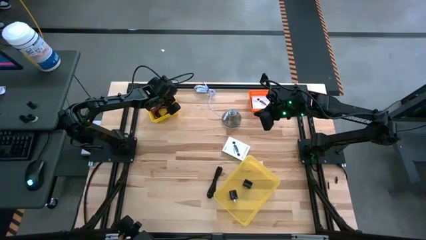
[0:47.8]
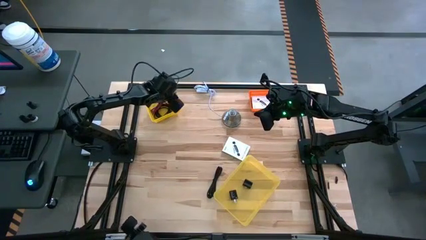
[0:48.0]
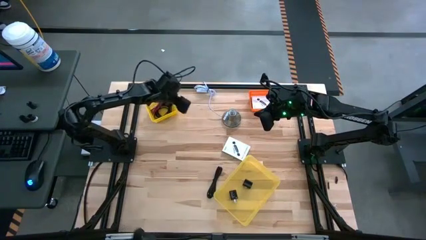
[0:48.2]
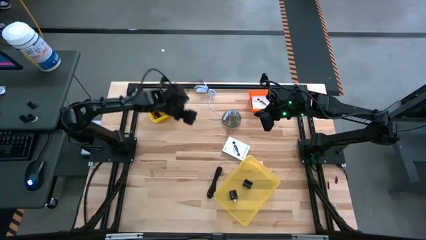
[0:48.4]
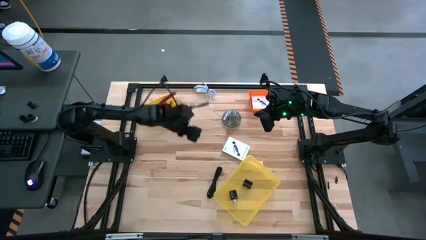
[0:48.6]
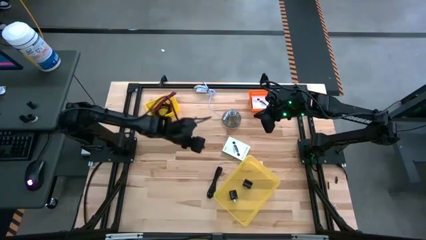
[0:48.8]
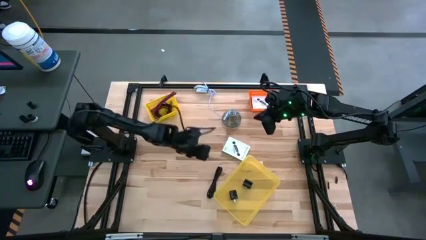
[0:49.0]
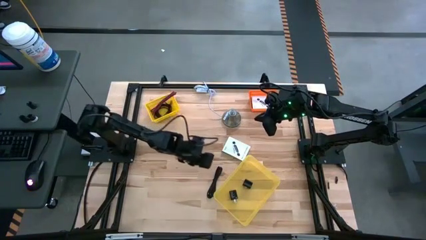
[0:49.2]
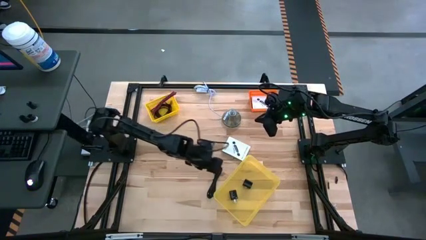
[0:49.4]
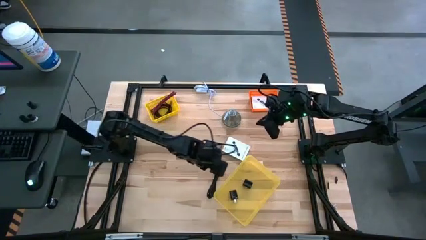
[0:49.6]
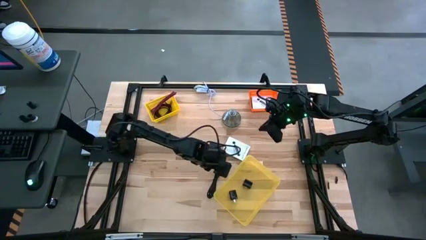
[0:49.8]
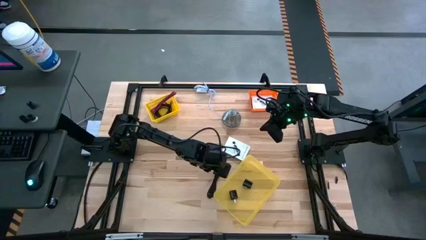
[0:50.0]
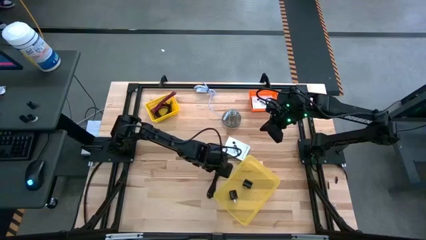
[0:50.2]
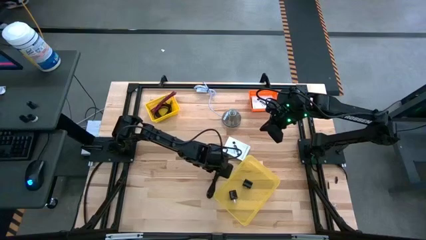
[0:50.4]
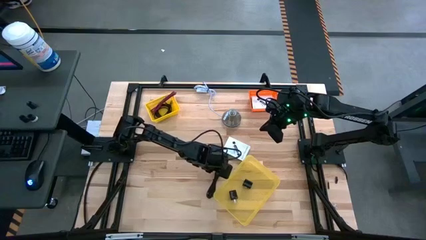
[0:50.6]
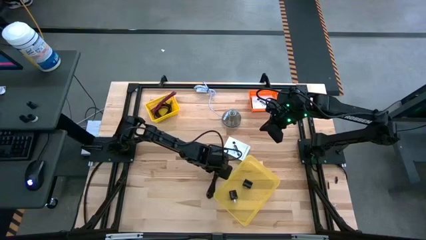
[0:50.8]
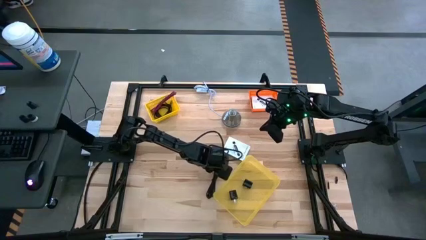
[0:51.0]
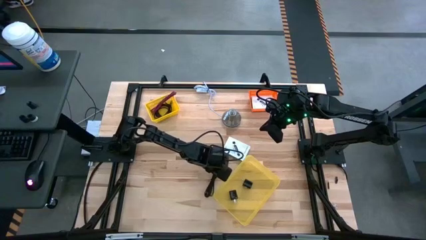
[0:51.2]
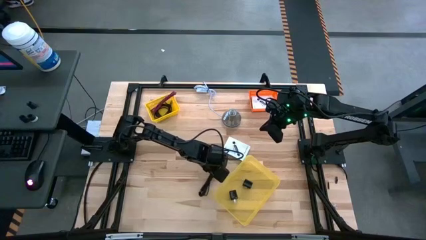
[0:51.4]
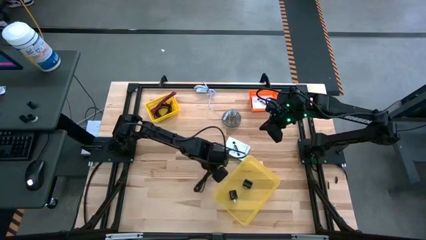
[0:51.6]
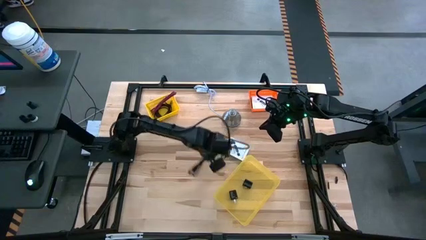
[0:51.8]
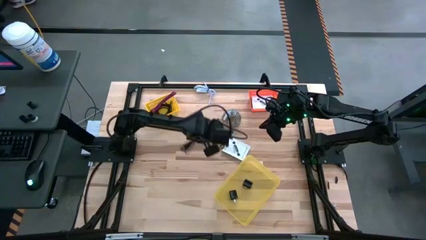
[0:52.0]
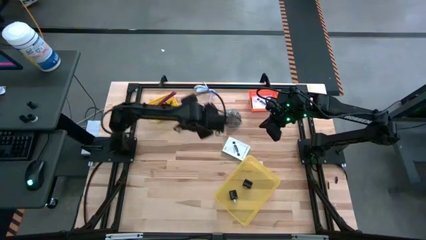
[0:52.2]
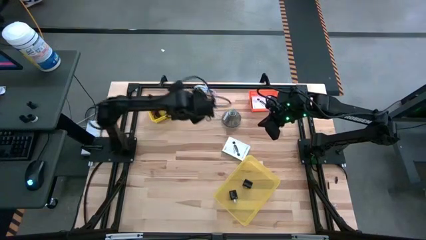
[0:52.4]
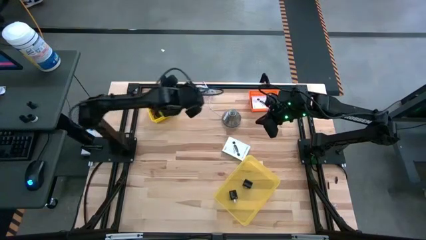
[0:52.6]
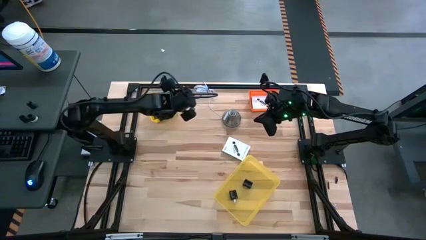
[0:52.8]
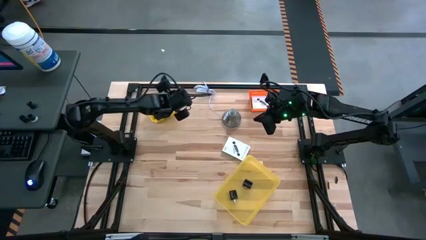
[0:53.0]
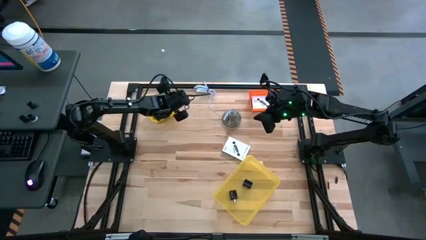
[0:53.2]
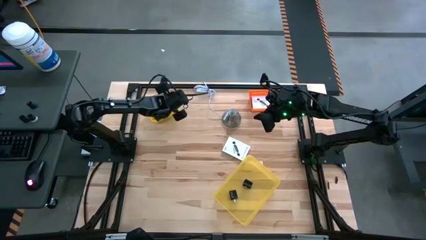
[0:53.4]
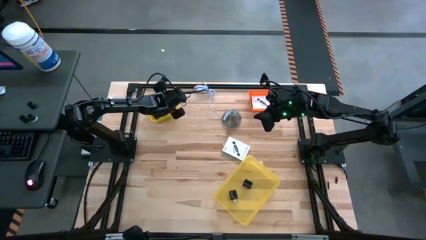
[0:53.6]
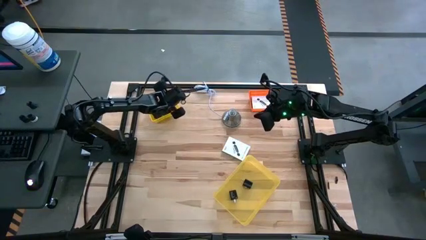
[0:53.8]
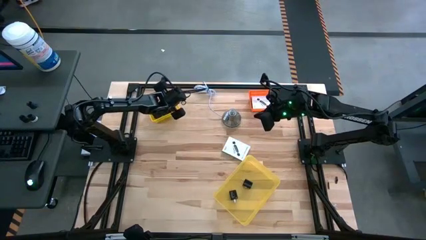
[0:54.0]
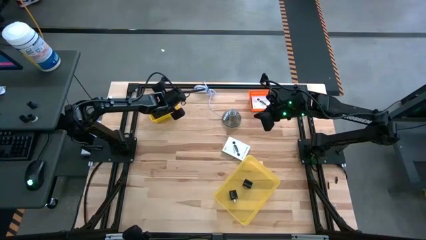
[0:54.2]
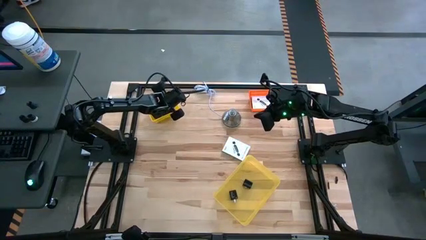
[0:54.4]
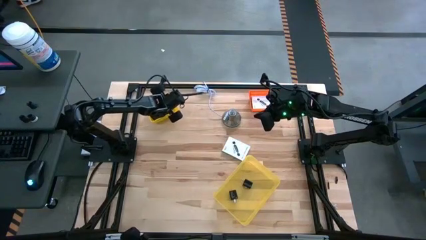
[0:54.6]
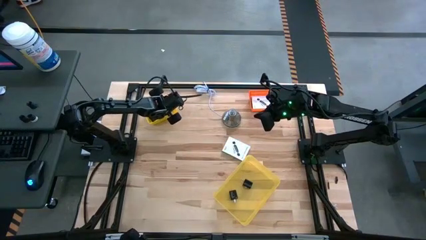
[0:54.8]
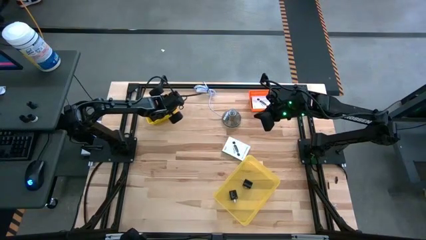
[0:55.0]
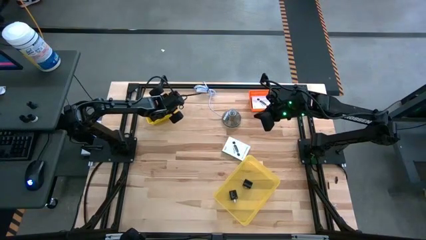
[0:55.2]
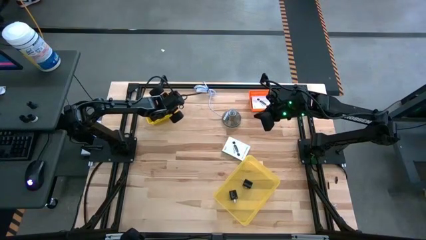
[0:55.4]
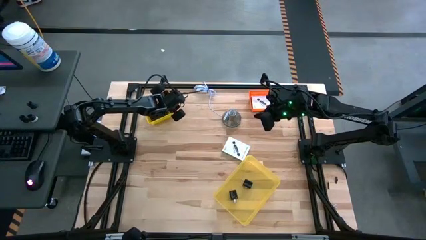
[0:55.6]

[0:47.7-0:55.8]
Task: Pick and place items into bin
Put the black USB cable into the yellow bin

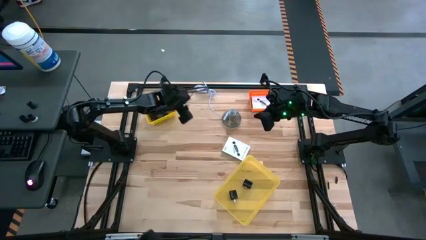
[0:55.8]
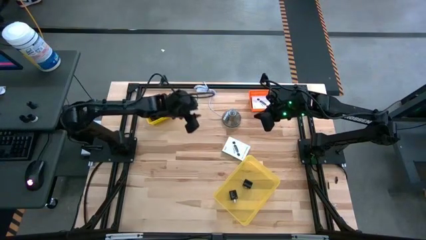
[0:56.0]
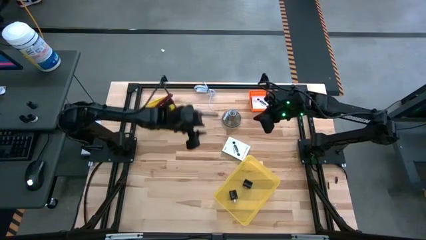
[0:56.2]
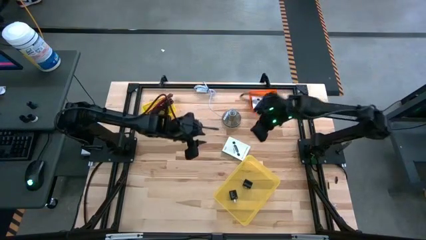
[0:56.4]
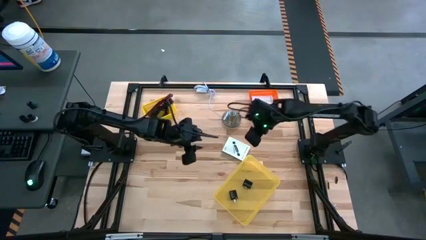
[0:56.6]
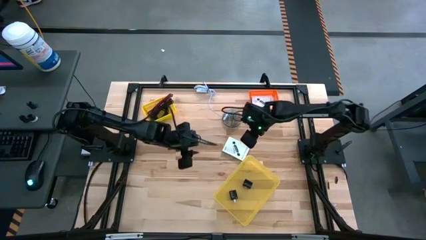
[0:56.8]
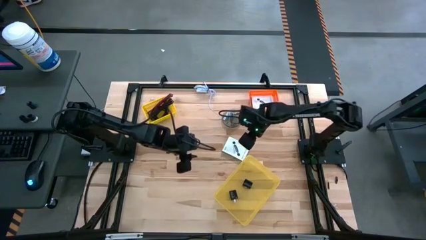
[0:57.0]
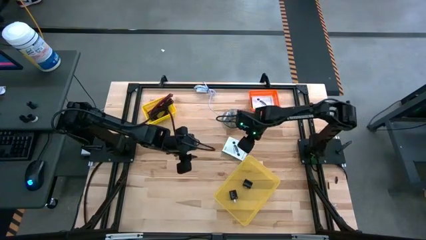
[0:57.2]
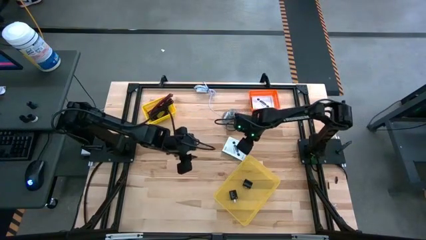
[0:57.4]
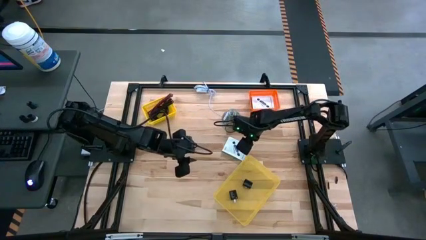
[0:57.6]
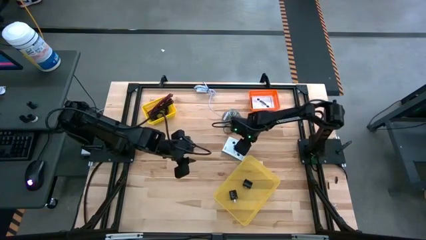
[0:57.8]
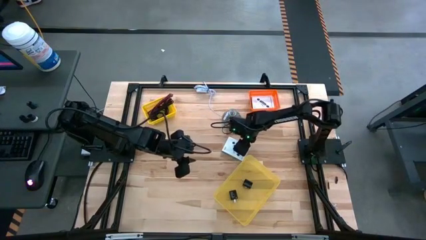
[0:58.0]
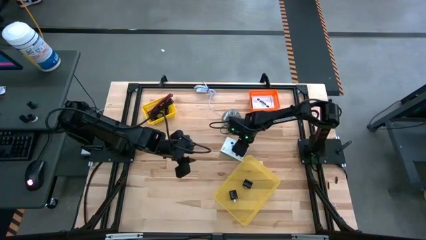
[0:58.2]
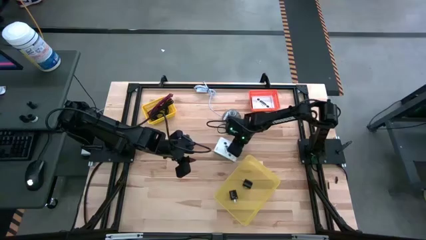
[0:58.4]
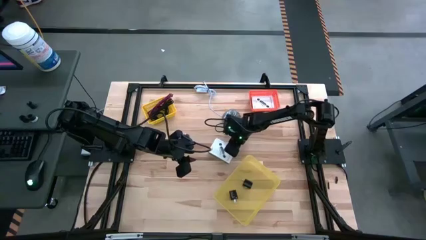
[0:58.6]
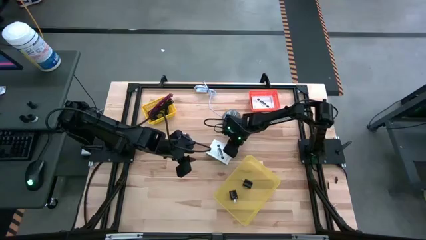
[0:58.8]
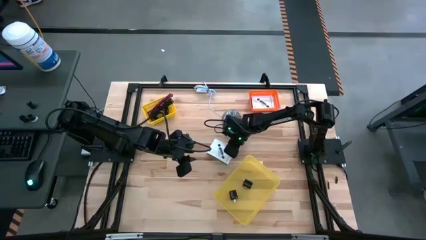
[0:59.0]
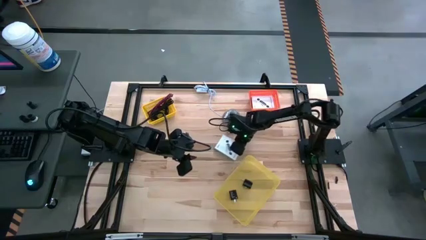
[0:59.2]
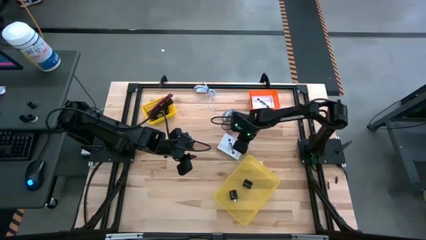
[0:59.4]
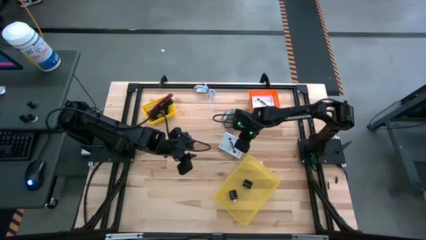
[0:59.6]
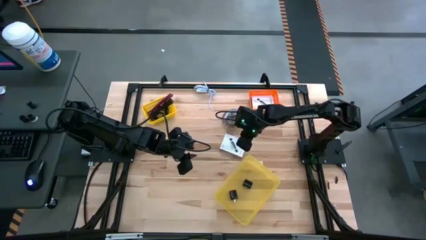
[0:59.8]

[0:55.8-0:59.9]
Put the white card reader box into the orange bin
